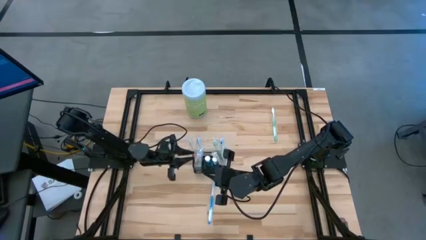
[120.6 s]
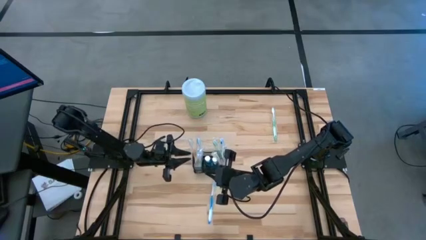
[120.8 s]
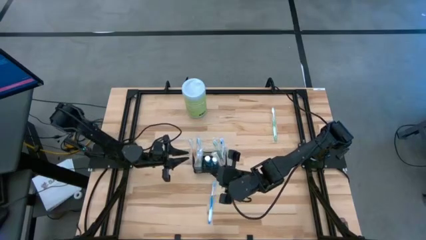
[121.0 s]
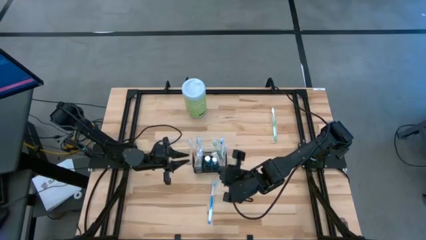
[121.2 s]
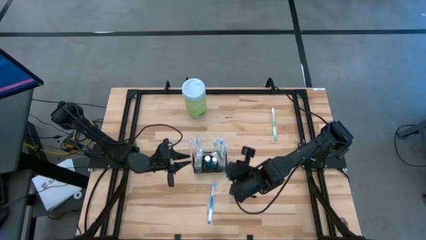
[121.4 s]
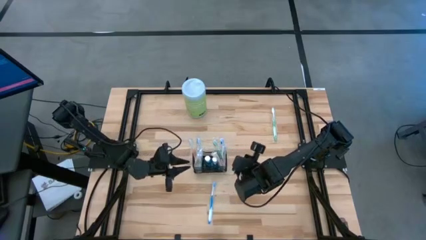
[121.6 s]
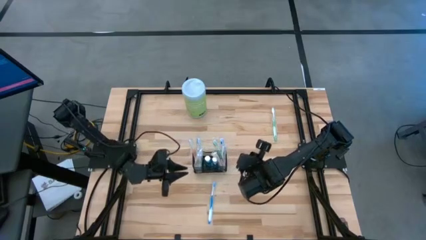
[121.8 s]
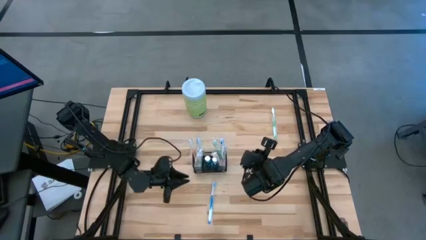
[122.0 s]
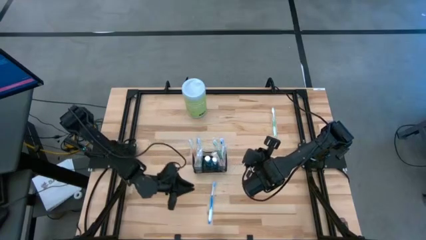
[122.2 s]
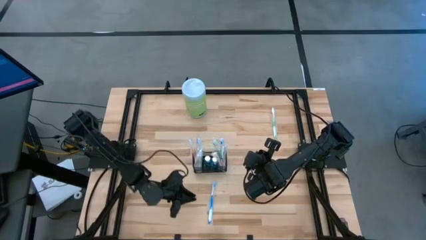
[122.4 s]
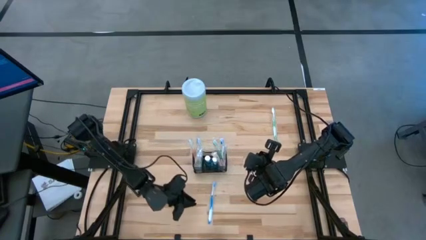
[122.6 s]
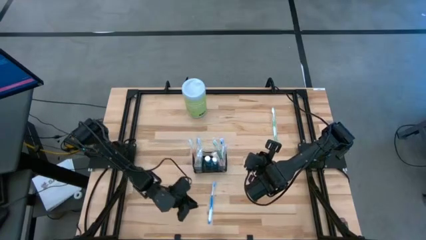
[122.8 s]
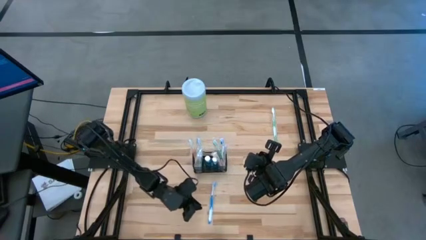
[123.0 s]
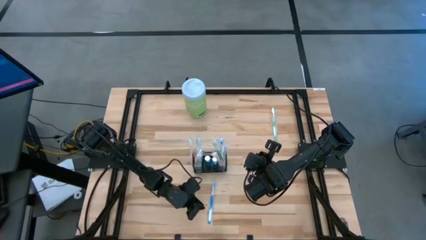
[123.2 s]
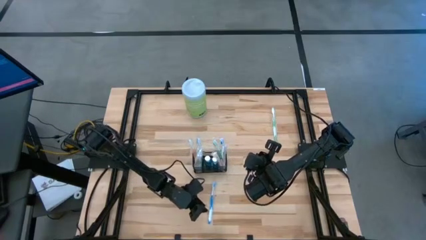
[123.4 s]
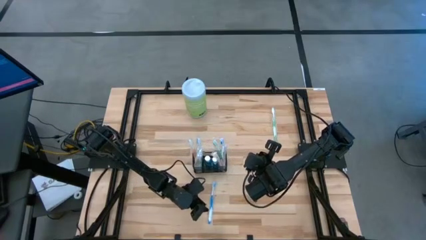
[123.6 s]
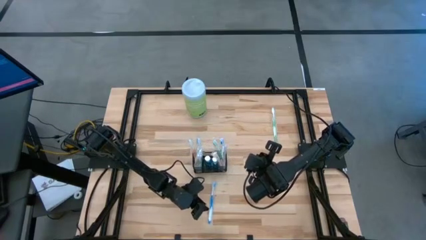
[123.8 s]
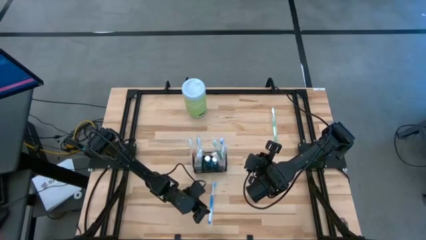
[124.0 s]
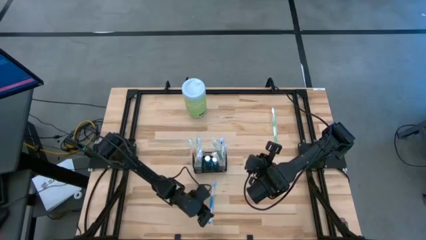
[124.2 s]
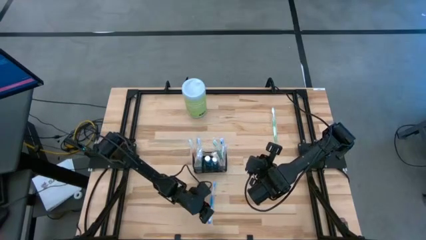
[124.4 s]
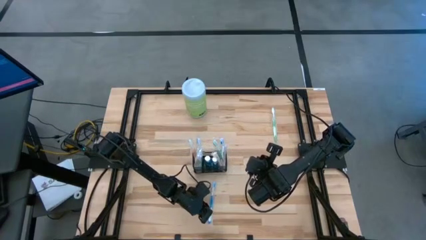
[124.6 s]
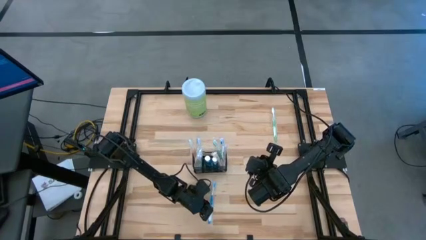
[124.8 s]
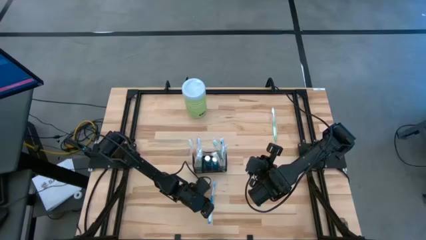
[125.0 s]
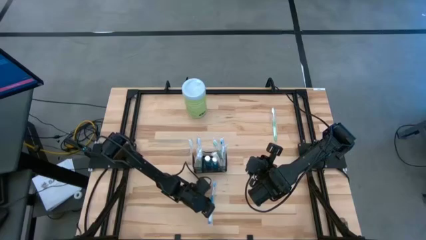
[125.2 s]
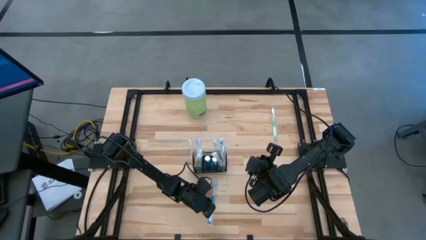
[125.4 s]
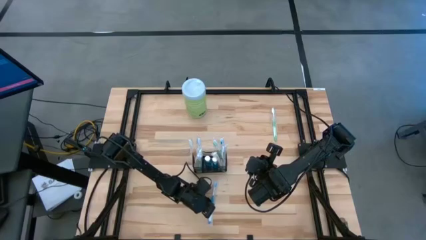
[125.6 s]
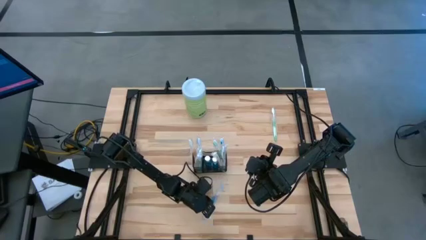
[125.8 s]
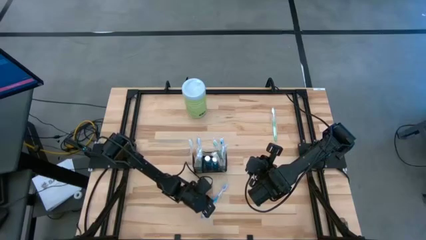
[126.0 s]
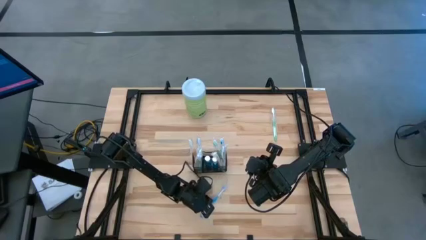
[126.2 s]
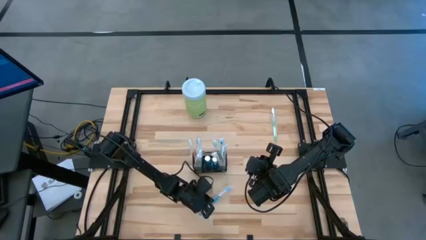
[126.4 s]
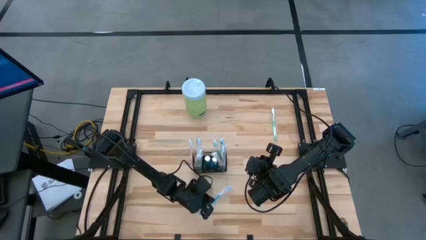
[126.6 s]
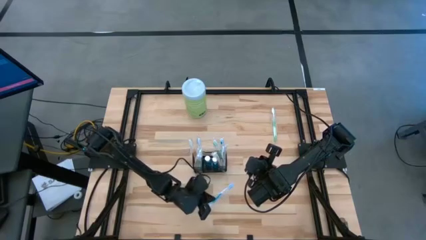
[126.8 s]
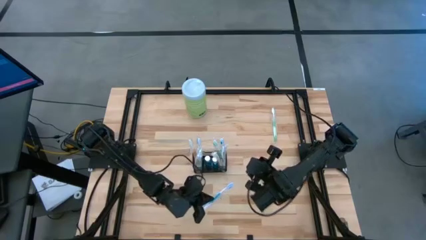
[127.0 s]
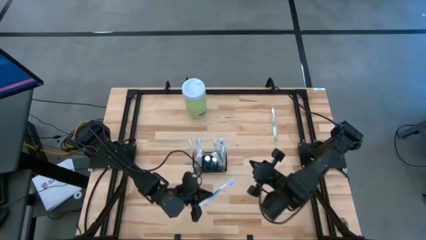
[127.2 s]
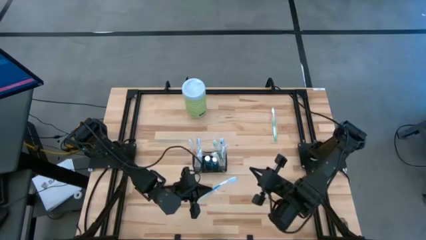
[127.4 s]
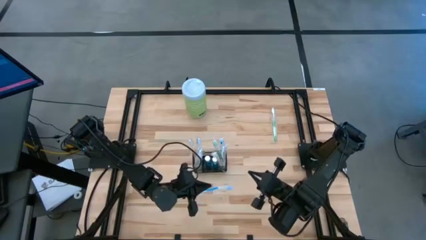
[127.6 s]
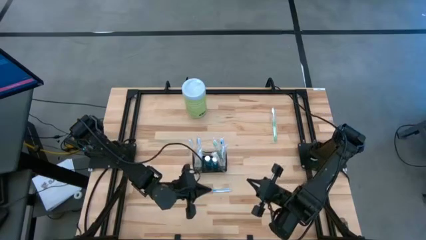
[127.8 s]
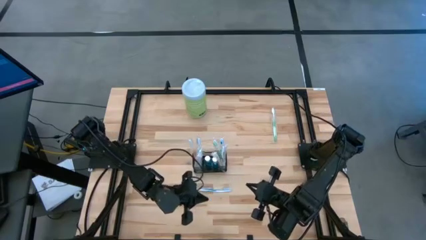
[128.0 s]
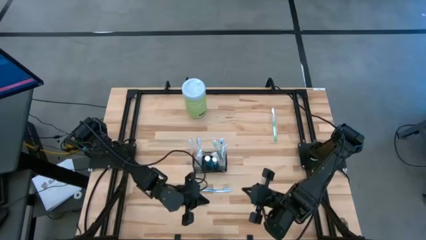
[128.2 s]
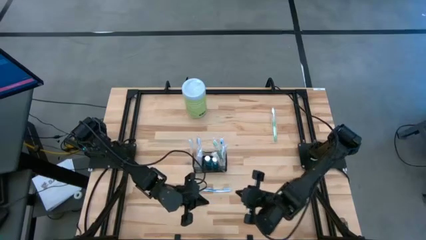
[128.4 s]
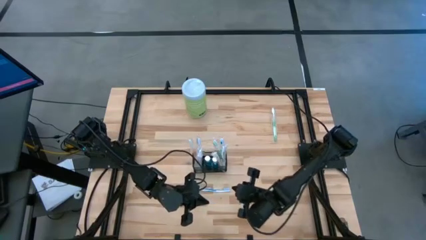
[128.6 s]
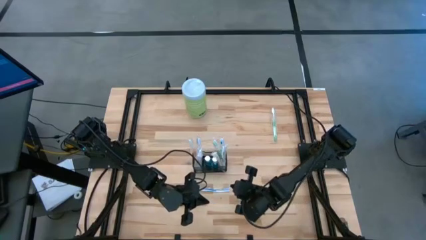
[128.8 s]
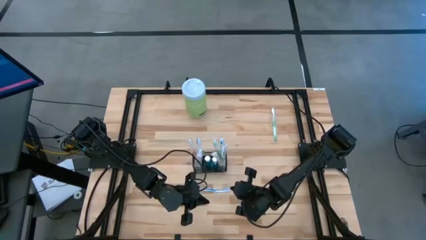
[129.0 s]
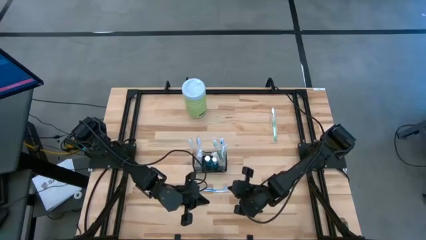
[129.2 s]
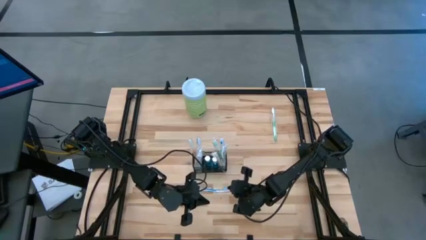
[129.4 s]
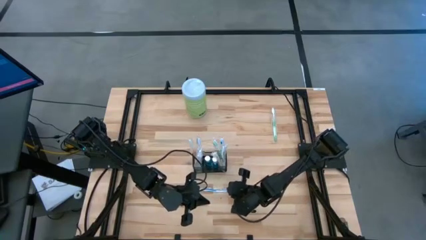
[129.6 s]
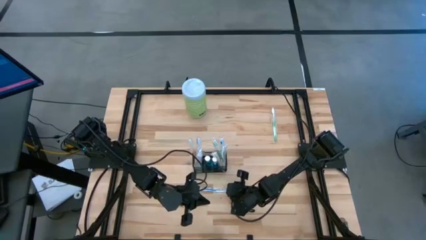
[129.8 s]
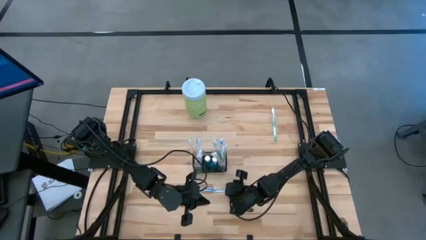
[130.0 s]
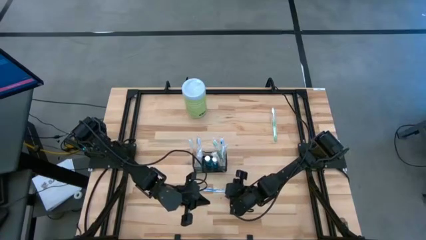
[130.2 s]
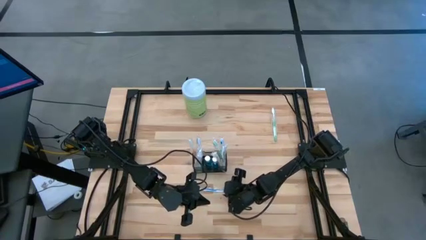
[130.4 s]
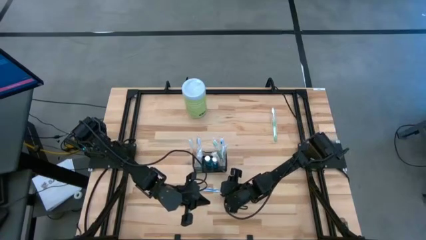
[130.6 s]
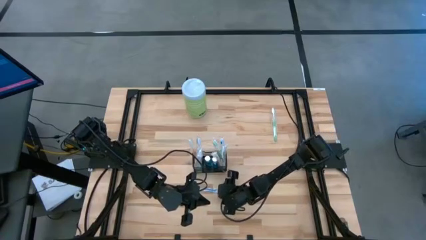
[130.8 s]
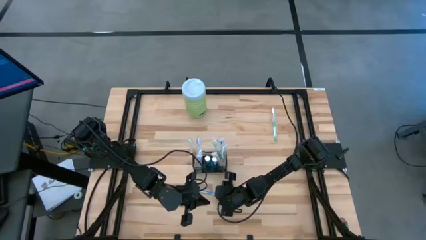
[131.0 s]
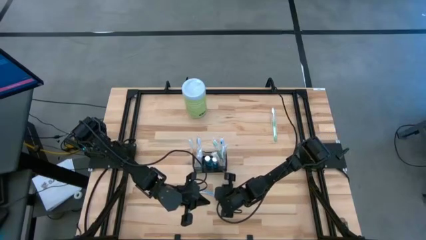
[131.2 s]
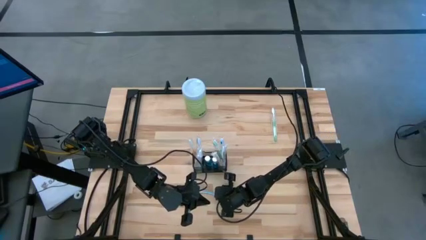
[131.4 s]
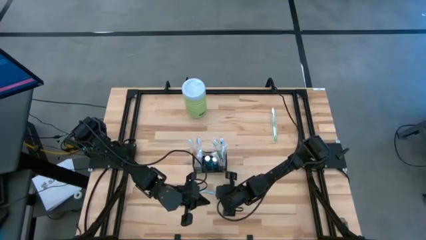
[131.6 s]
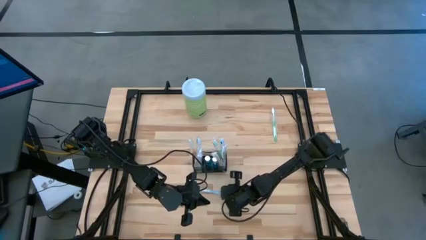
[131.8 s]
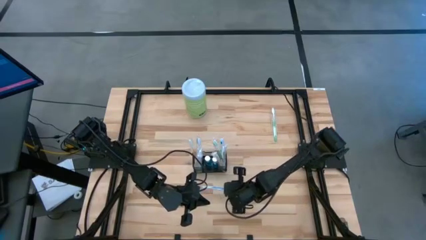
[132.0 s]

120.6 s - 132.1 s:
Task: Pick & Place toothbrushing station
Put the blue toothbrush into the wire organizer
